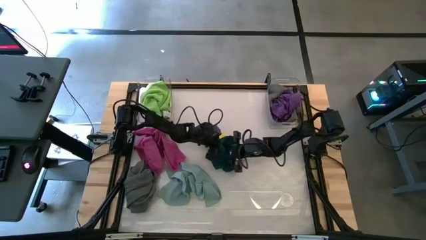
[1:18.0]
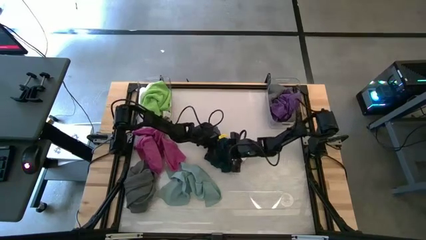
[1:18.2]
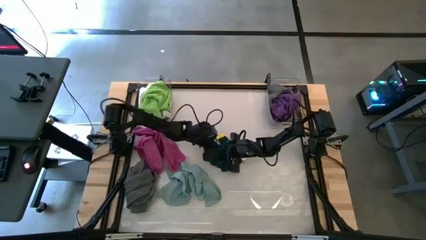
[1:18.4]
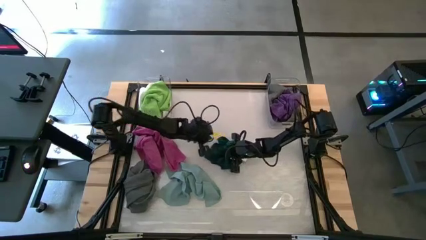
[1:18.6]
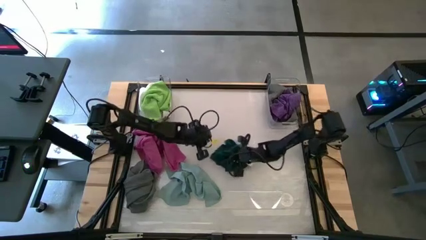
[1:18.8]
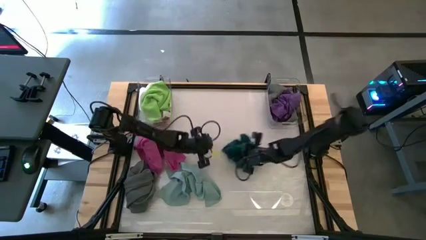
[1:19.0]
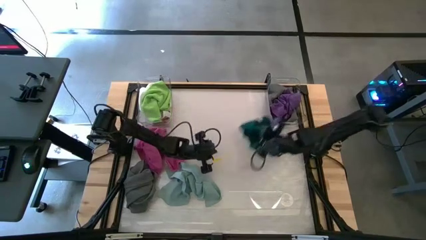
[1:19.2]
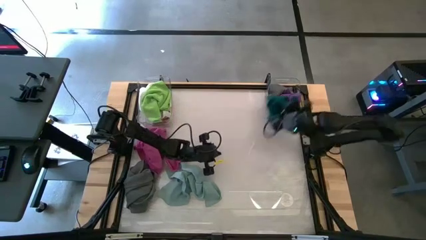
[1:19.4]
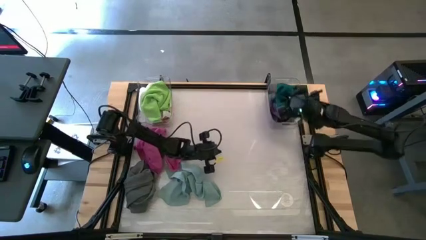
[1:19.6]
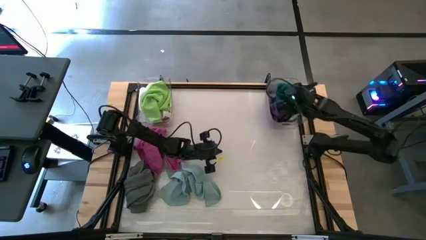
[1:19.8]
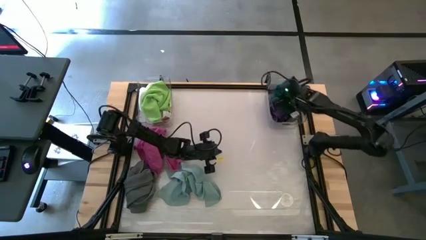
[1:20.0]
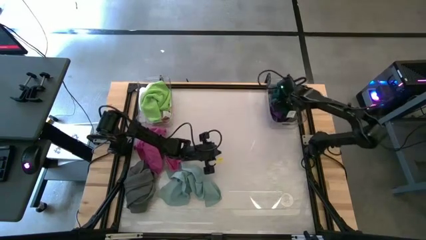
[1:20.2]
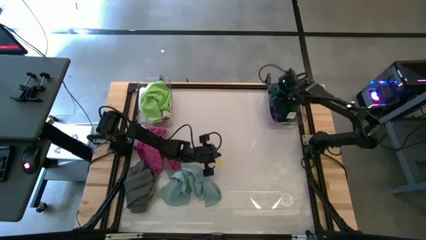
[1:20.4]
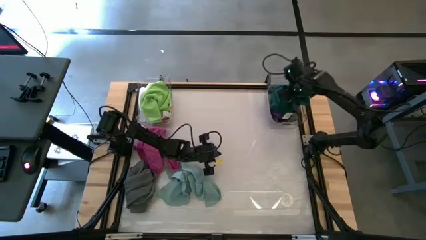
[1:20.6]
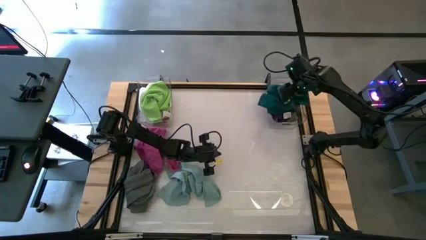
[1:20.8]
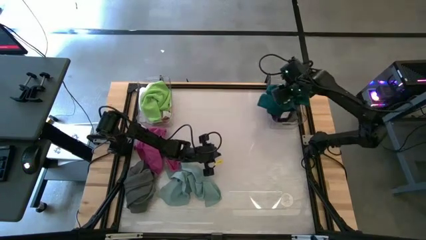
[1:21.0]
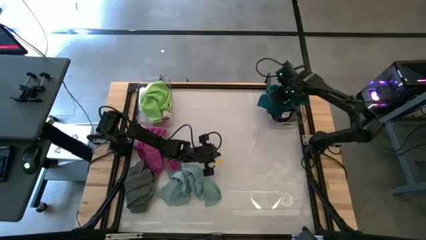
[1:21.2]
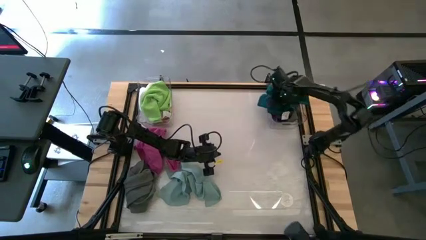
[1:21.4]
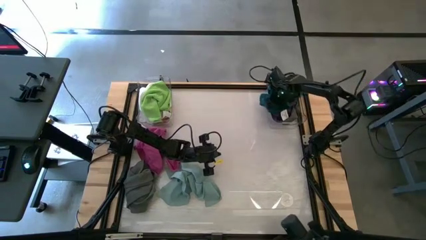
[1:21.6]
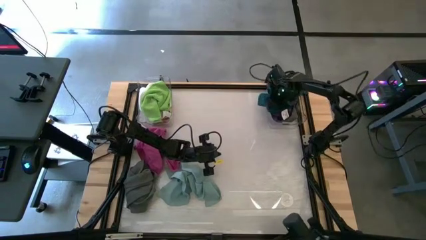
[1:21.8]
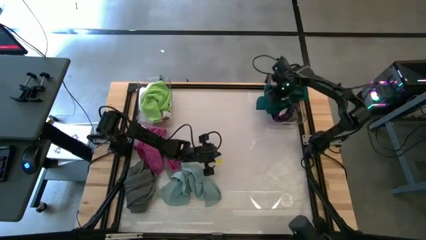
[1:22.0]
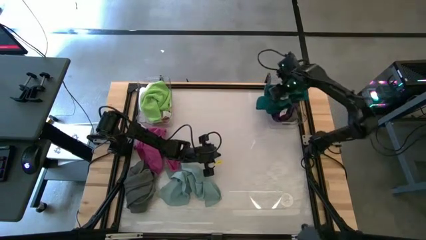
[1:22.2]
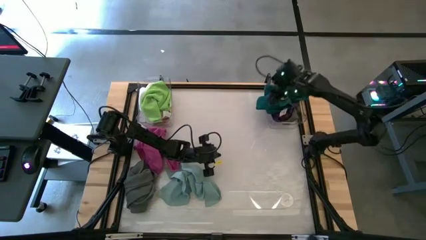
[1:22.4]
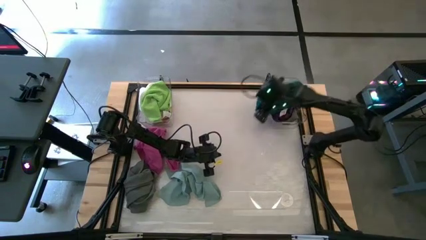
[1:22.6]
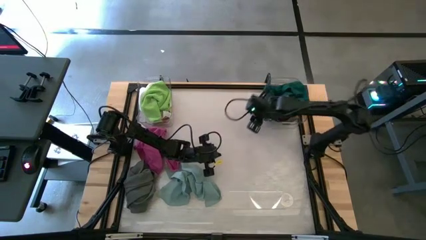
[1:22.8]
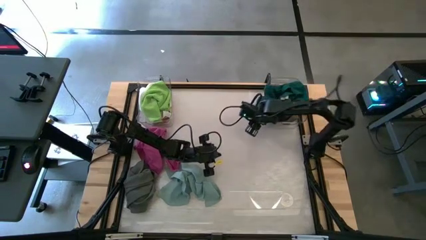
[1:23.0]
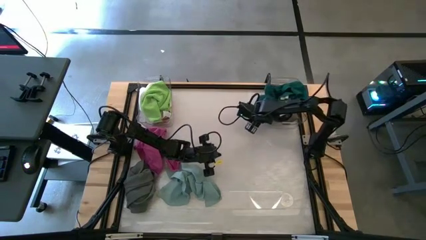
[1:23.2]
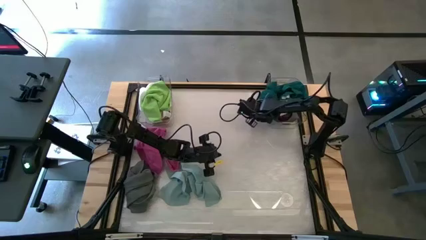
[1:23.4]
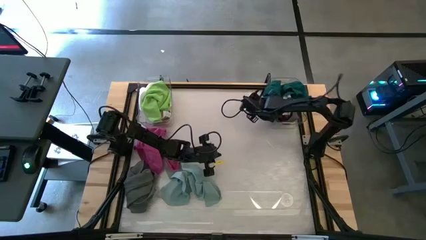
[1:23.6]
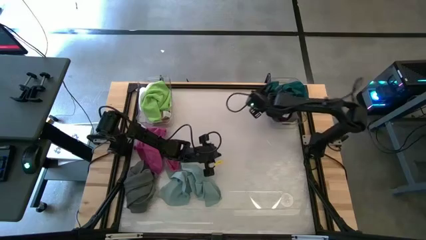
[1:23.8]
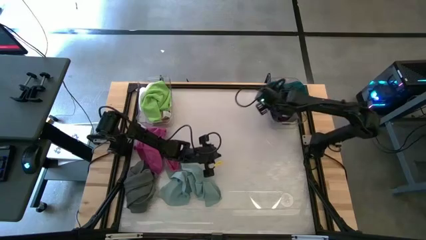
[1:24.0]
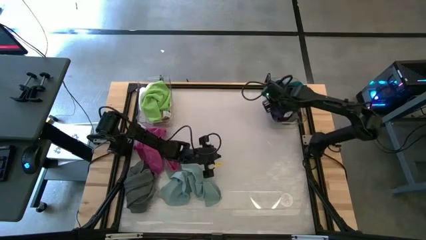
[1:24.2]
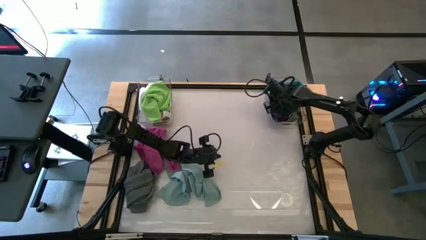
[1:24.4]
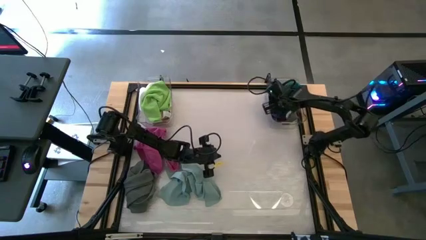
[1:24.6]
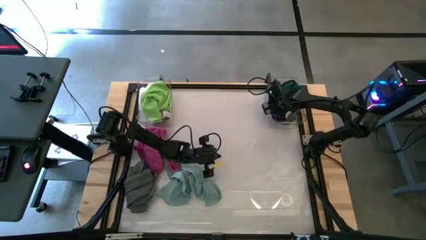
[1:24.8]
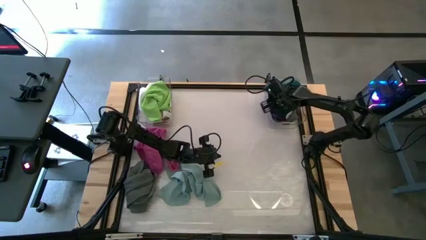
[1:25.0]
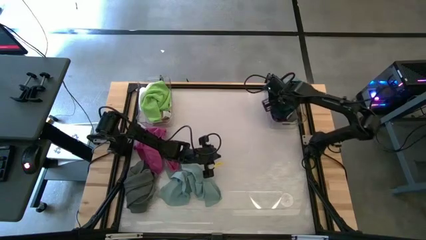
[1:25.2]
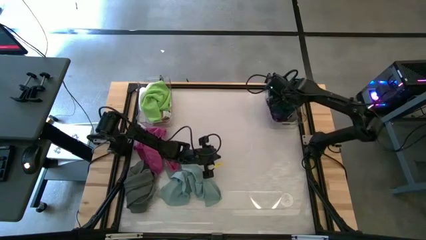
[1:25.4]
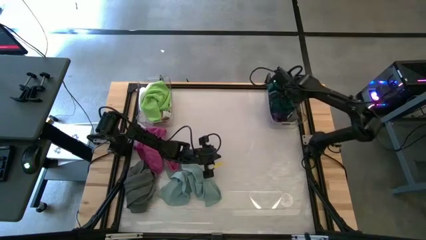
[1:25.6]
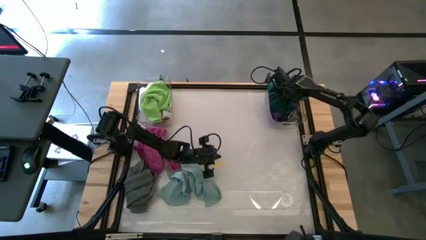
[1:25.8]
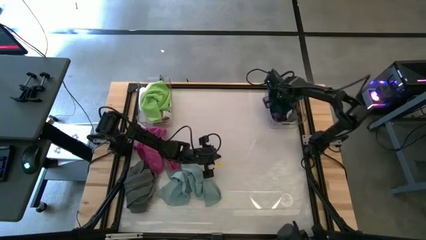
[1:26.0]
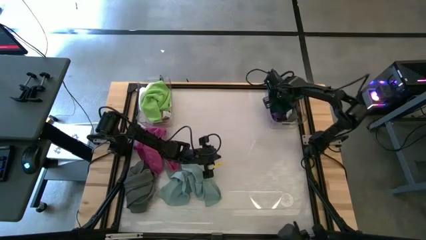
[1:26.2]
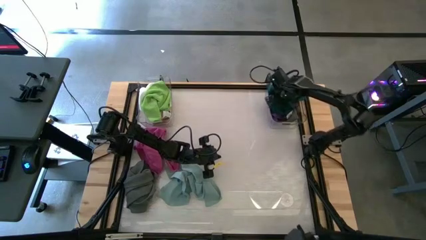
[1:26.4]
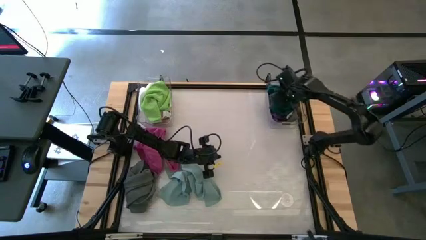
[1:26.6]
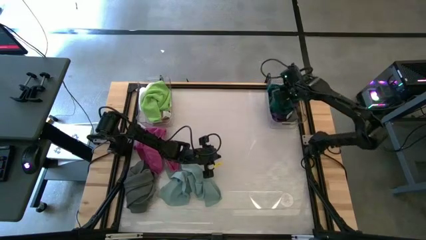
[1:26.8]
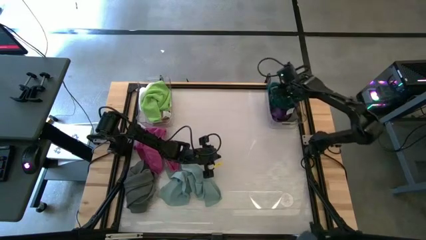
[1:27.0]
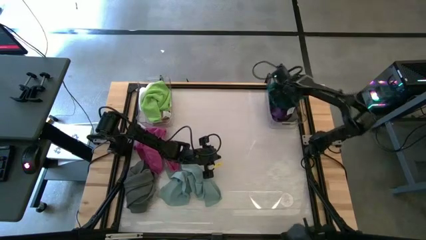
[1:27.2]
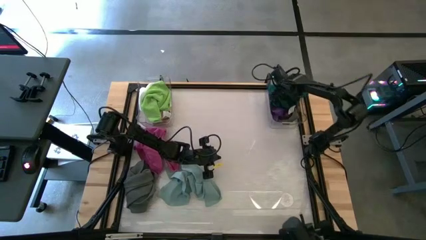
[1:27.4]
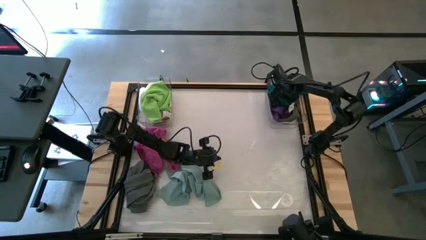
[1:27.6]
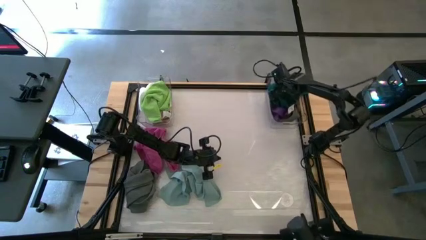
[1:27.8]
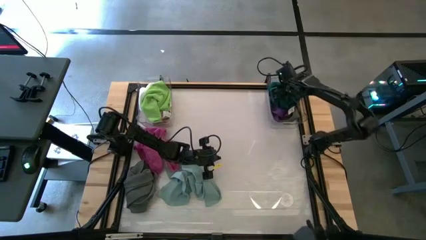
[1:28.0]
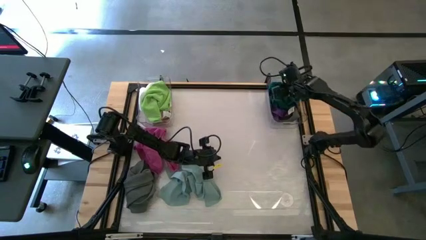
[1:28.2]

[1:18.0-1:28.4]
Task: Sort towels by color in basket
Put the dark green towel into the right transparent bin

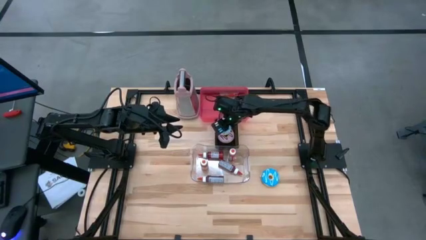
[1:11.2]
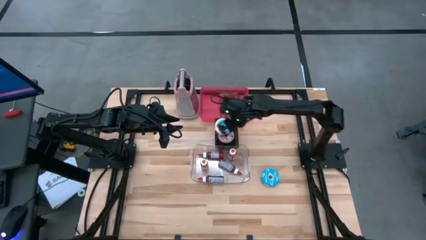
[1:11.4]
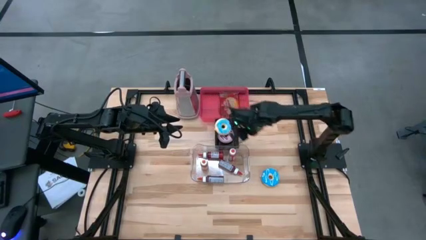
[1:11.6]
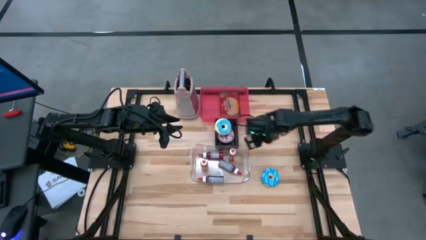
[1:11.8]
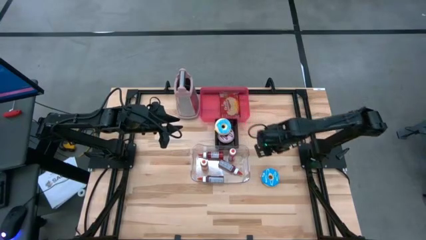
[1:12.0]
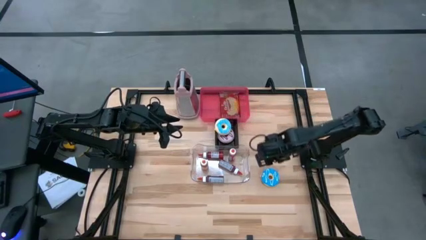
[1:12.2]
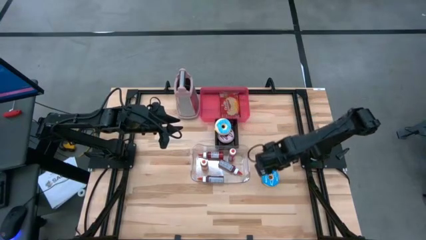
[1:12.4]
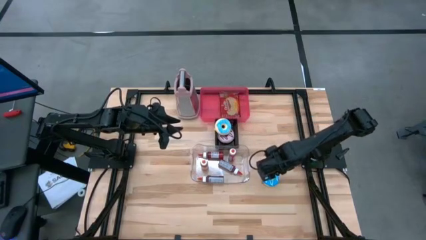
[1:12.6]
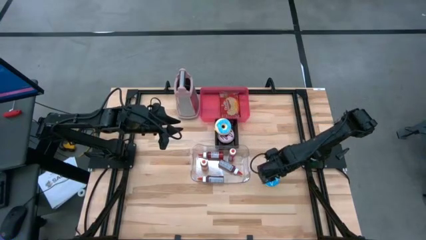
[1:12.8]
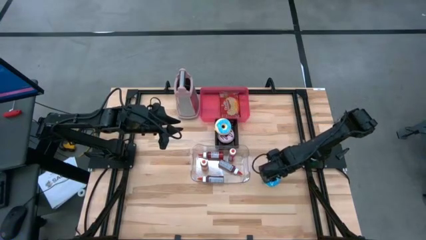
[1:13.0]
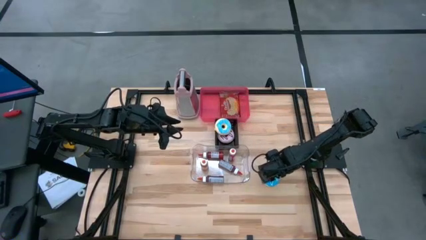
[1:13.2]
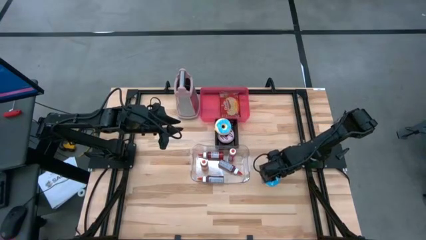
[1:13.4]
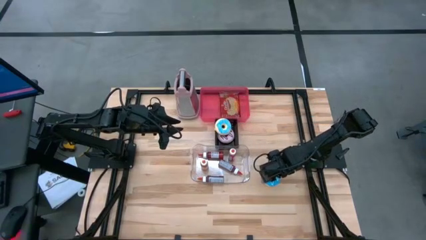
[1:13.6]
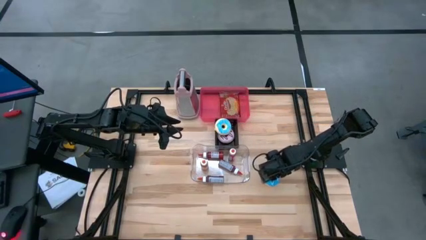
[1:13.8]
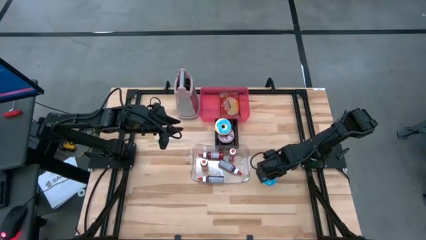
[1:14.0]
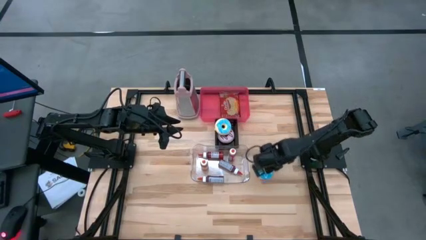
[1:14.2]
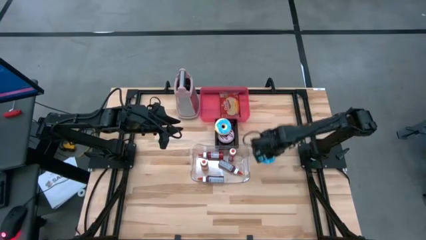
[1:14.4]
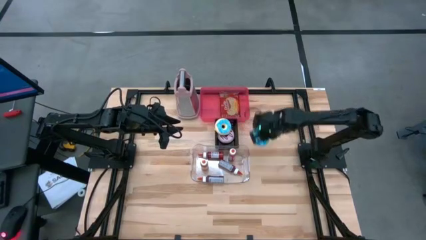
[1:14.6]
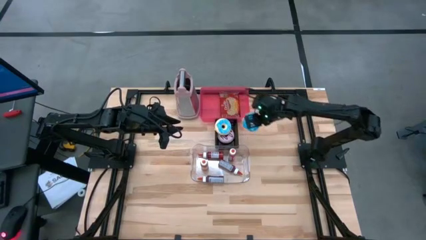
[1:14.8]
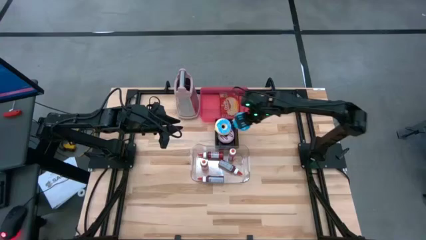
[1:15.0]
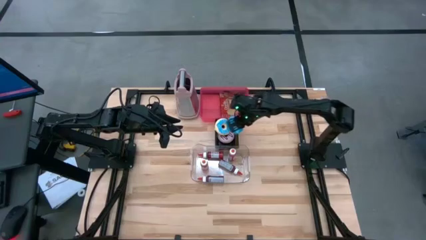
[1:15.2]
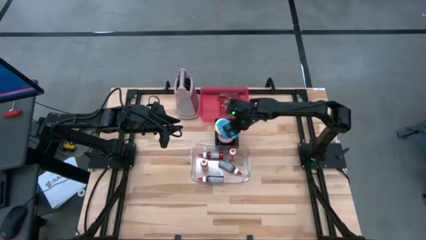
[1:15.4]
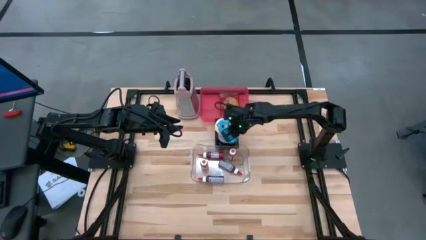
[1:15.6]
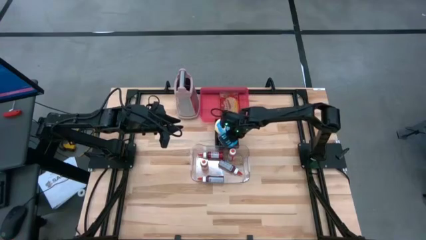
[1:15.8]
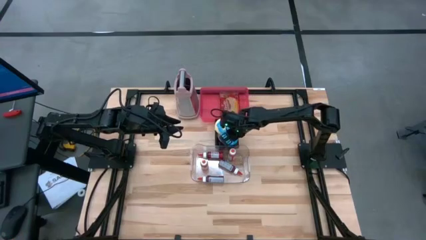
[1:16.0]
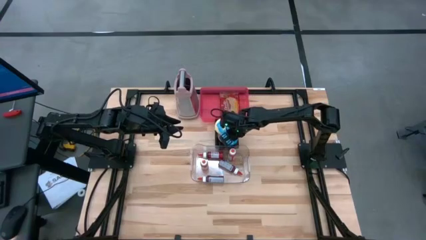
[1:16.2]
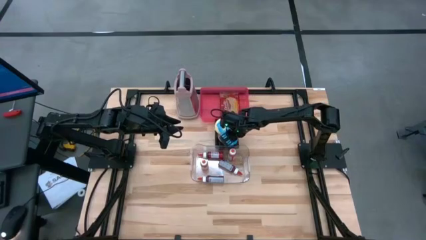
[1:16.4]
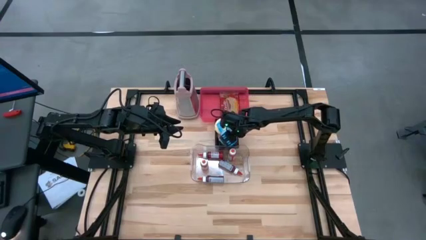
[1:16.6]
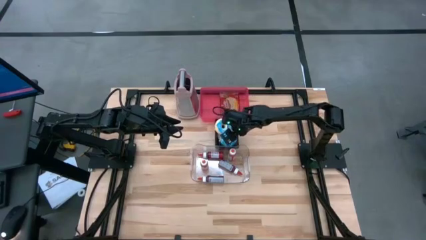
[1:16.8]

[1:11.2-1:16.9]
Task: Pick & Place Food Item
Put the blue donut into the black bin
